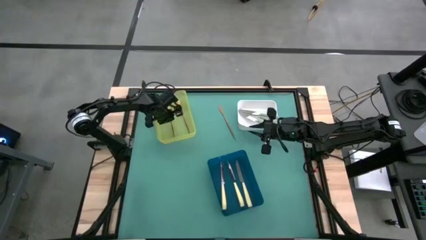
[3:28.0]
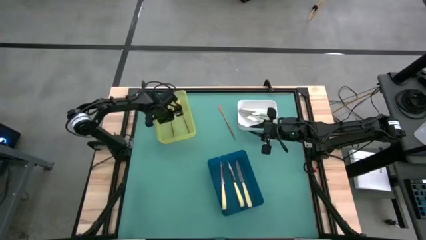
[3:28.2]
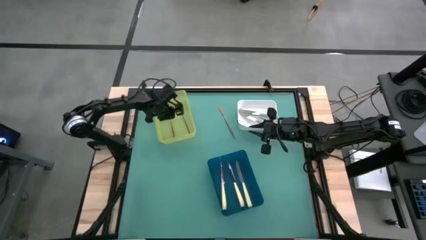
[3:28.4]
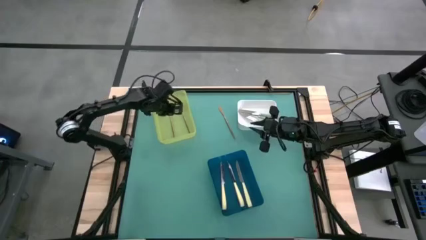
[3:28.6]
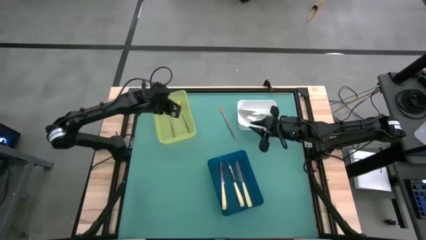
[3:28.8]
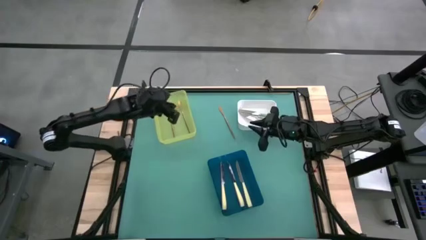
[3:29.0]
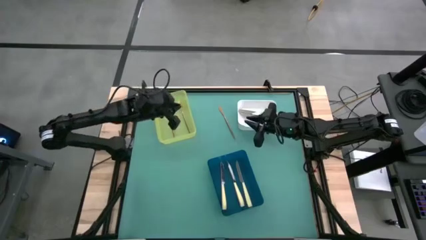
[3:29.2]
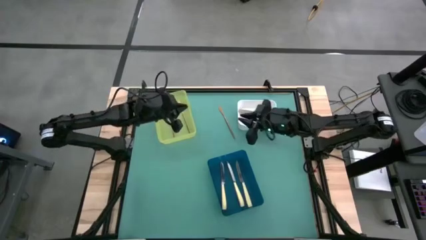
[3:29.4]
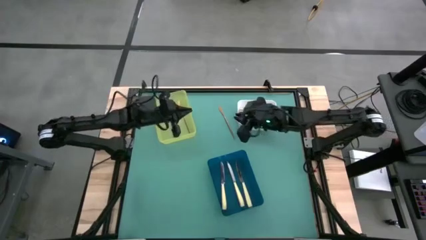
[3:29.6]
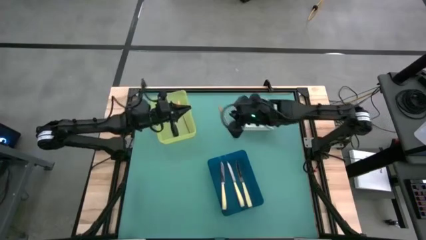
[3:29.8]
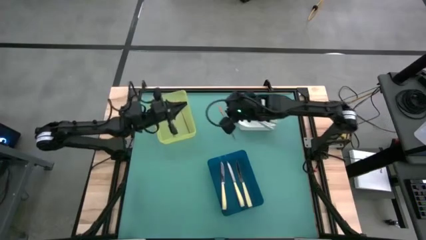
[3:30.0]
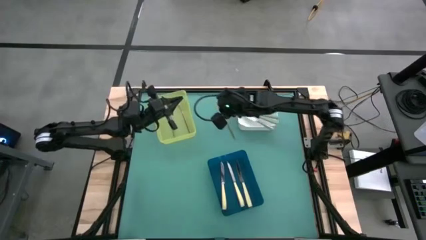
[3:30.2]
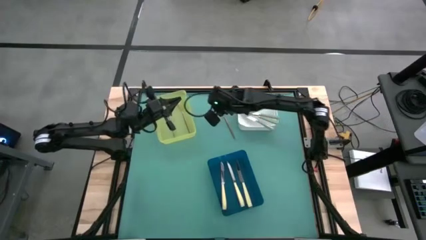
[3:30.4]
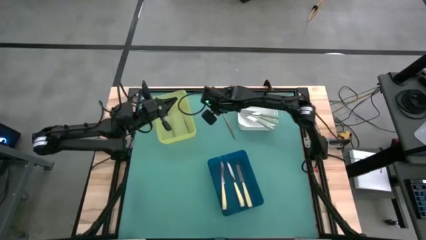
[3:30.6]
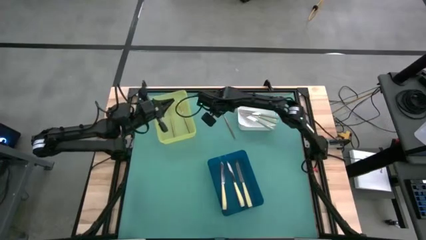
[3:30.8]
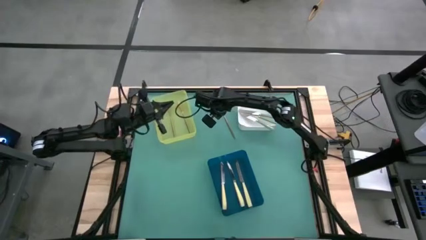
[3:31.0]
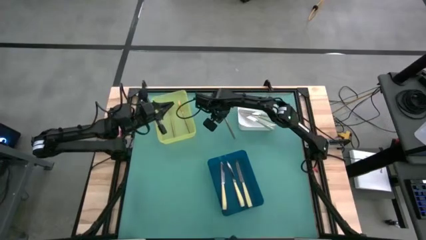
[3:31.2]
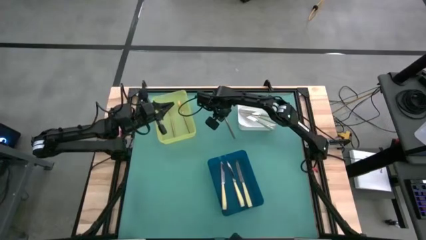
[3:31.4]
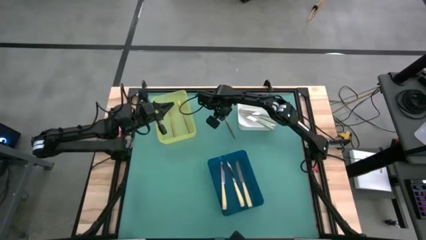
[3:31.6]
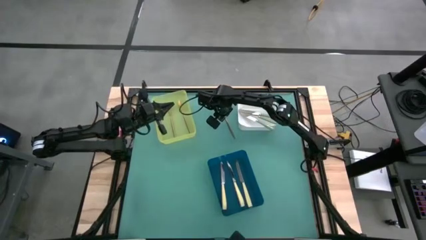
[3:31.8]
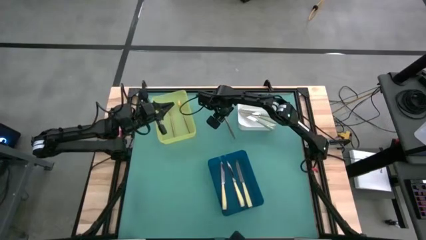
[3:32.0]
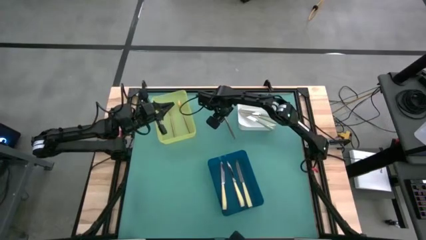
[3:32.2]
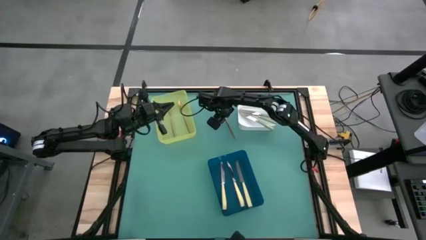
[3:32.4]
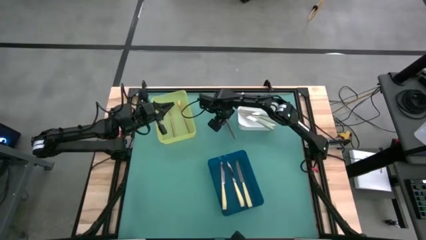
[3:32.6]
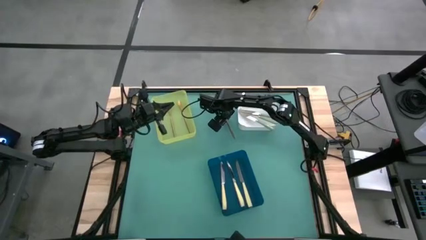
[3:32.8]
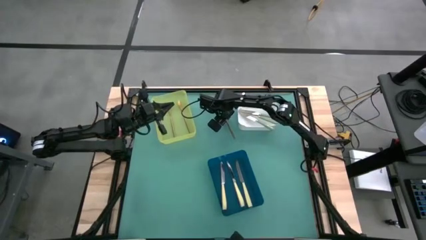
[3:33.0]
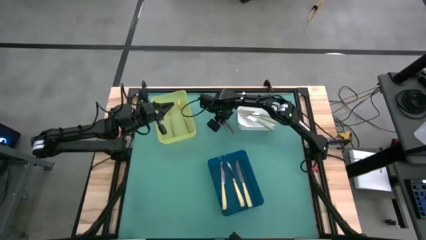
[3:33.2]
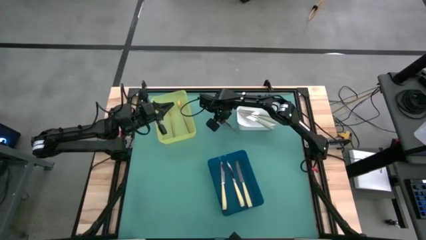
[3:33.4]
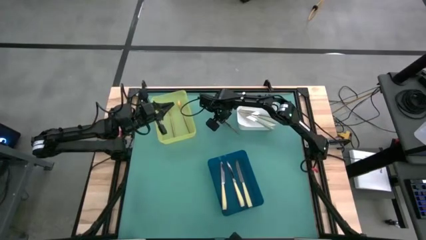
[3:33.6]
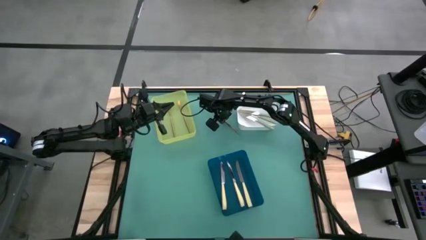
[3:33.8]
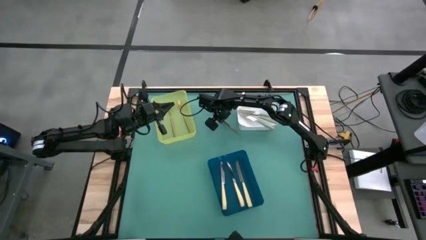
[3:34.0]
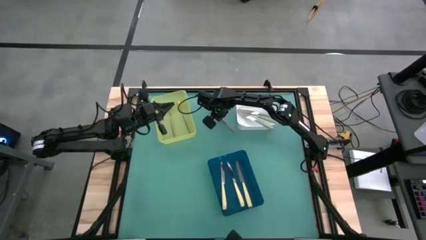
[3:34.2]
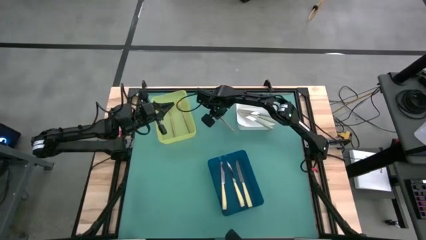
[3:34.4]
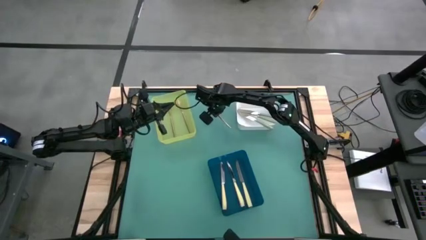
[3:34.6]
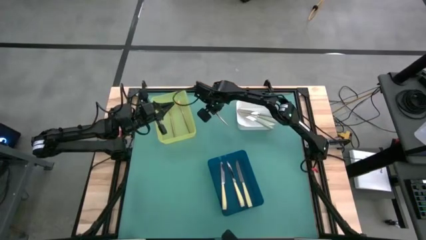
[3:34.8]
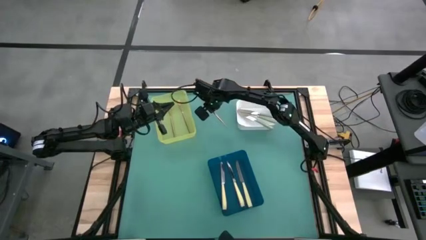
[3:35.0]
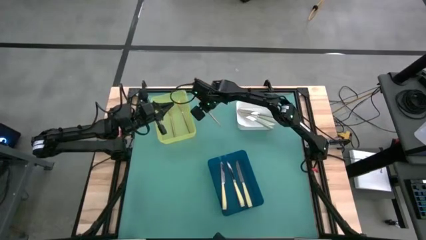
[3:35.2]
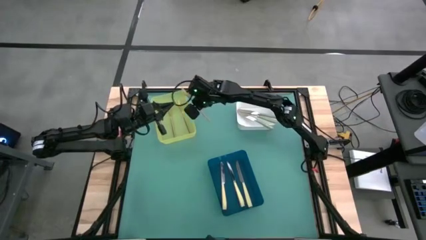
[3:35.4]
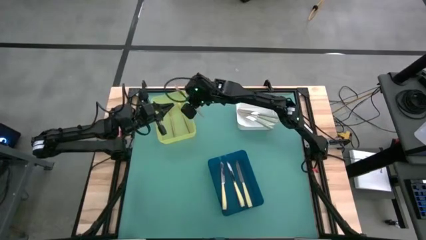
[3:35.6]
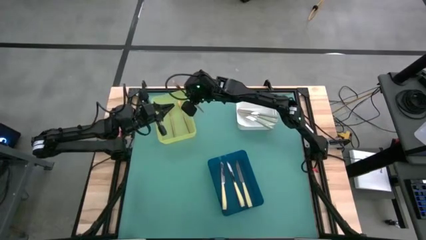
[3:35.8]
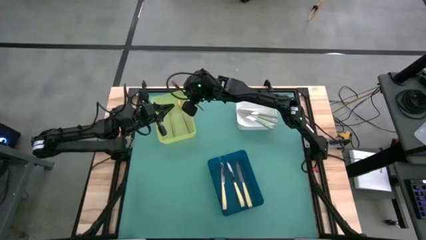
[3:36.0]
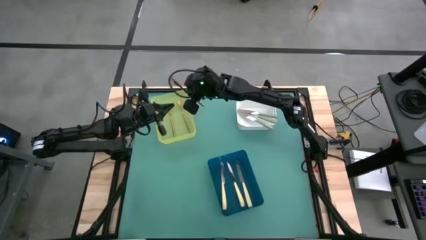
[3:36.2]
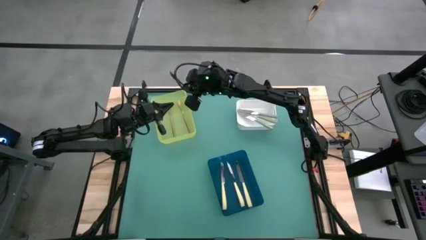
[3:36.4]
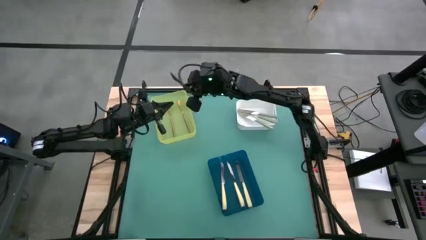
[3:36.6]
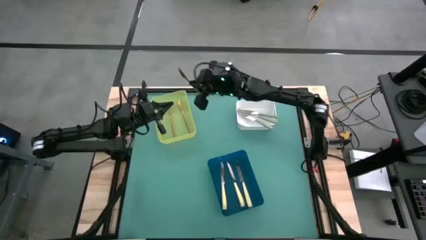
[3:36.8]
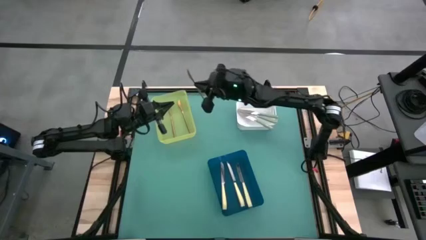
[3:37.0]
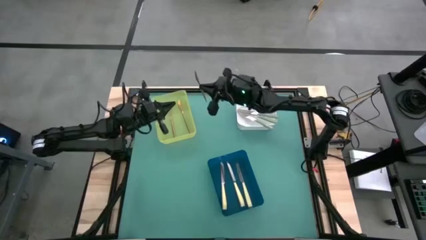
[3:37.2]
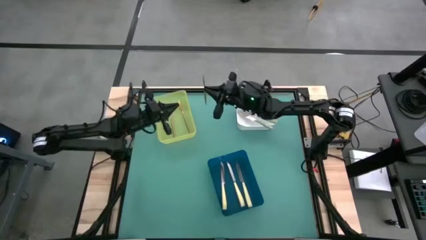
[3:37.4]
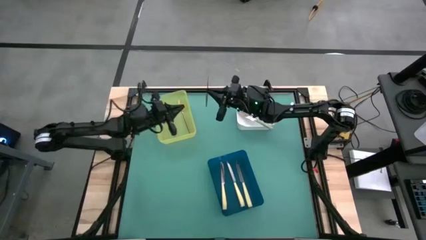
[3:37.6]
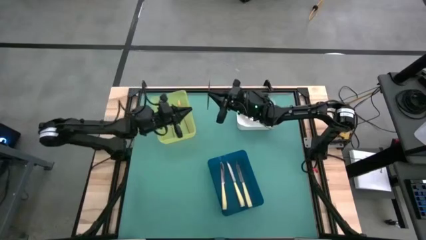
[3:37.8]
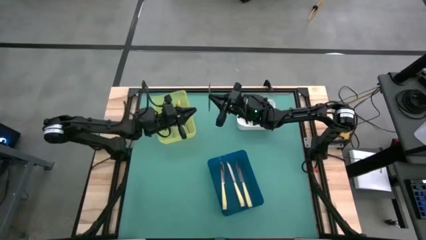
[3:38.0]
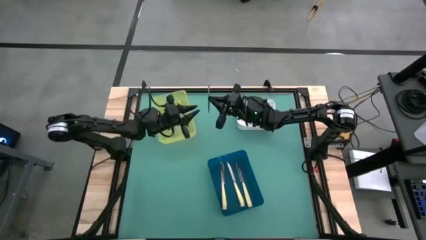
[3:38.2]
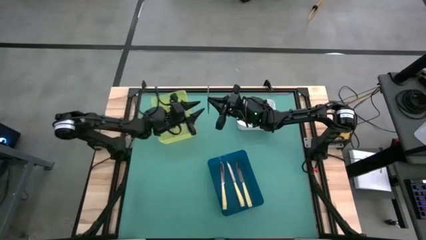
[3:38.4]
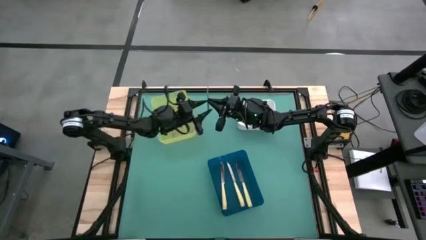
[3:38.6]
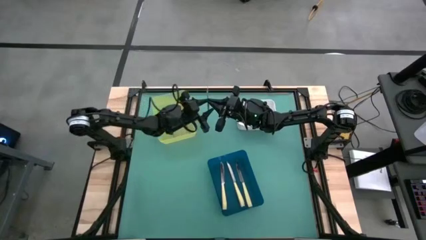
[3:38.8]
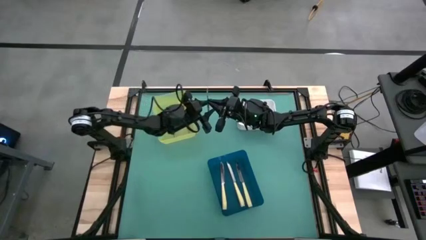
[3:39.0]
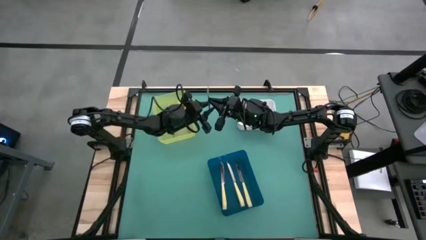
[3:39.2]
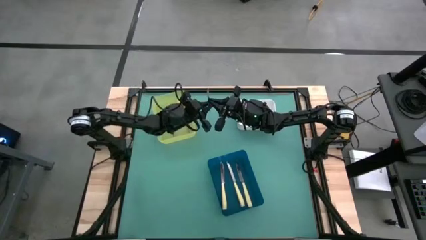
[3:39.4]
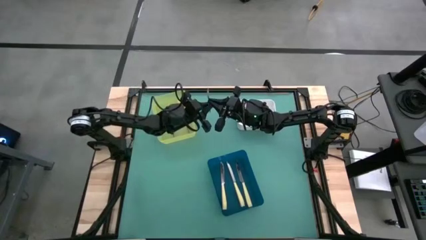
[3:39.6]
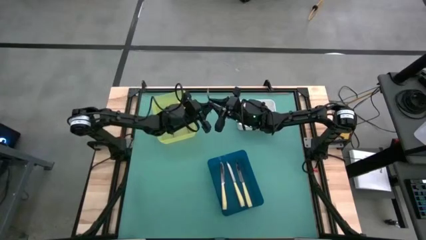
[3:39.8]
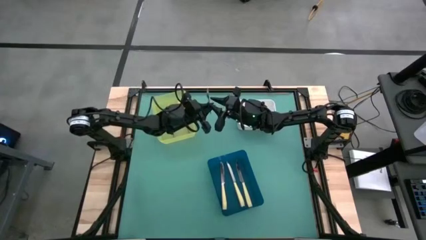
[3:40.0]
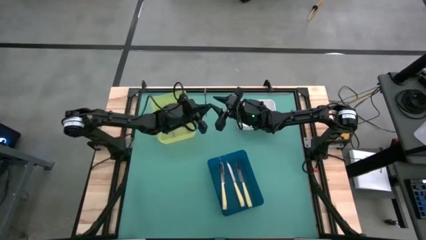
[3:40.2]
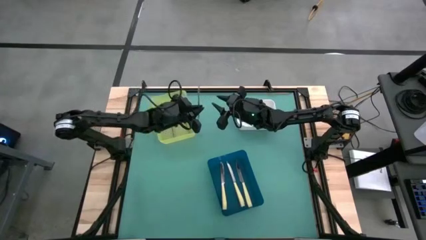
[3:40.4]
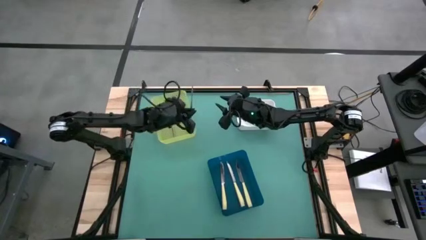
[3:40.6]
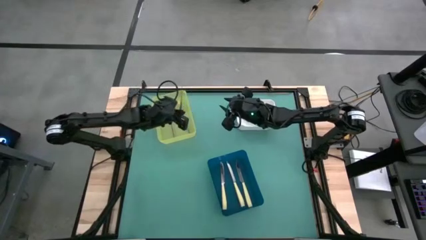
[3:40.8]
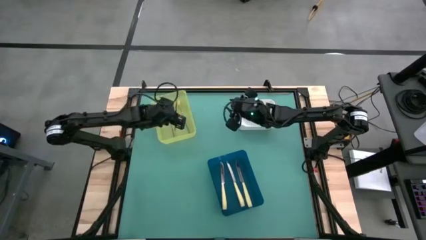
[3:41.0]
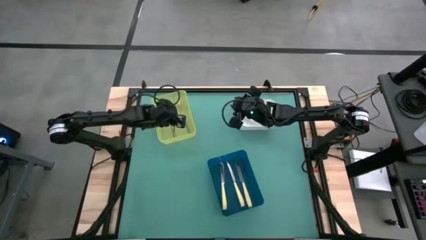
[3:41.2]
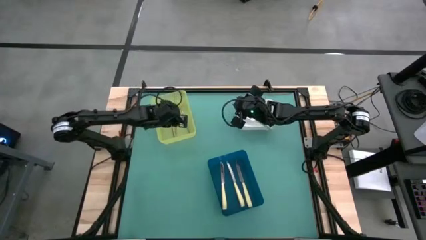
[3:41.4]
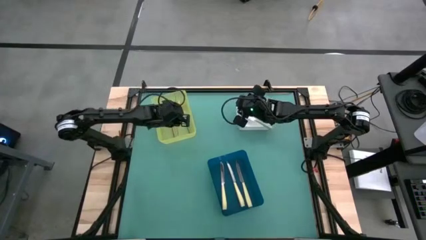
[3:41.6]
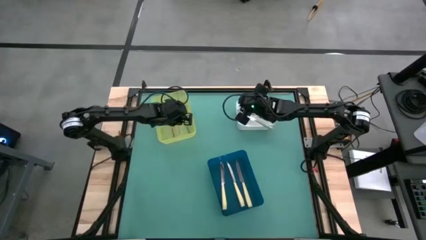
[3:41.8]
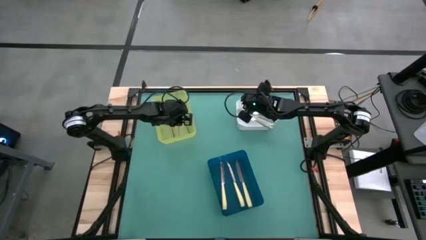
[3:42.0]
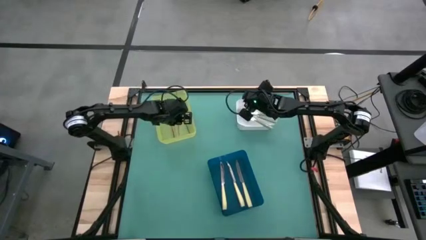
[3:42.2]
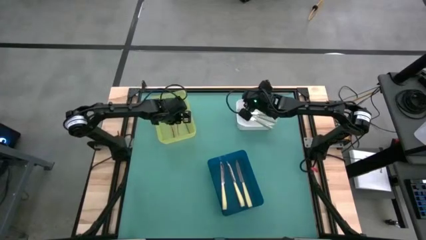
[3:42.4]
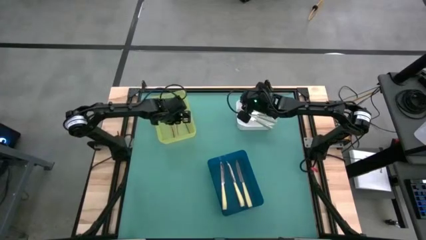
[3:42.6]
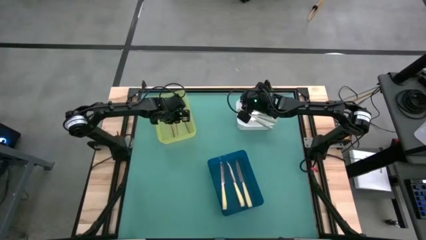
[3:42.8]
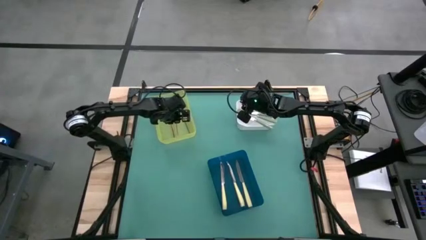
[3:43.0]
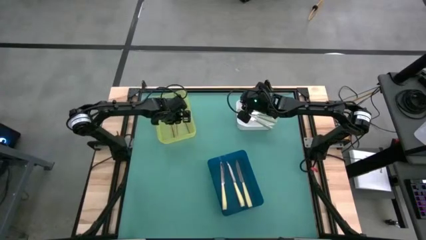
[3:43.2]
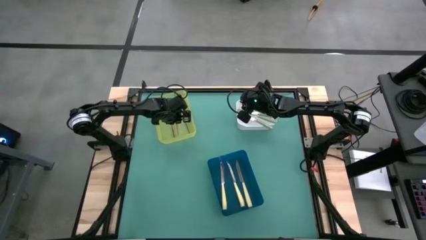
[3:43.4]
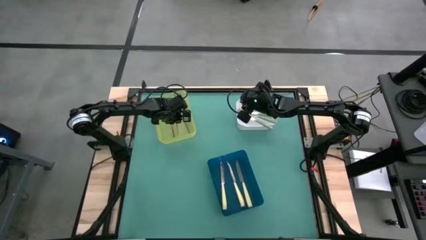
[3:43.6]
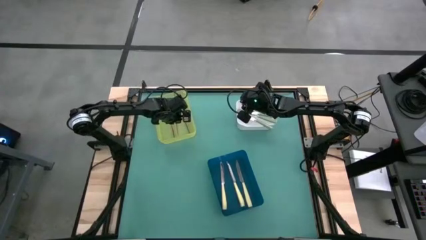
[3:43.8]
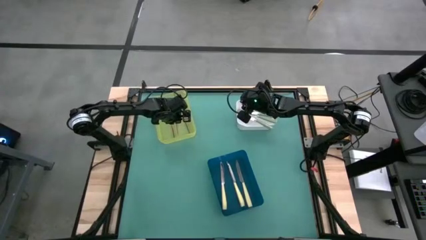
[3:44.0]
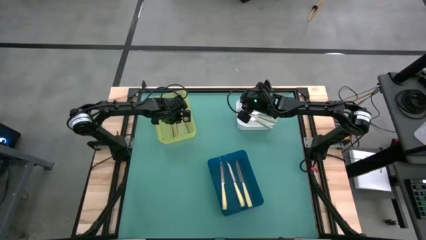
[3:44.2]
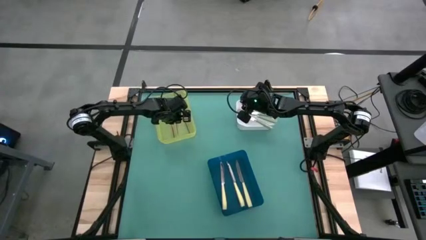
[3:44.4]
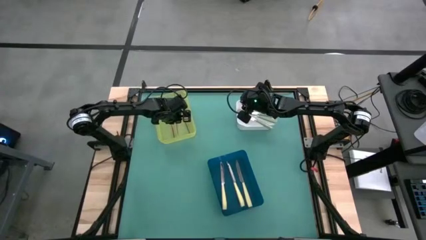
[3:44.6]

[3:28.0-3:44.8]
Task: Sort silverware by color (type)
Put the gold knife into the yellow bin
